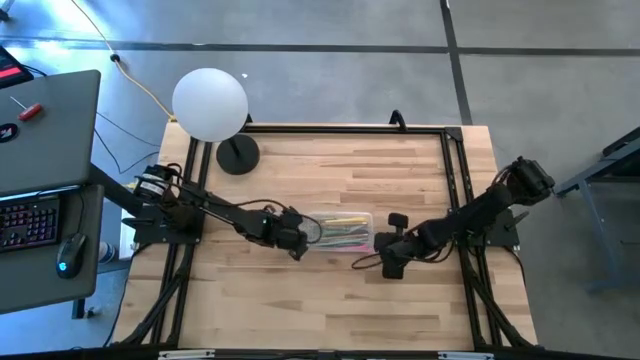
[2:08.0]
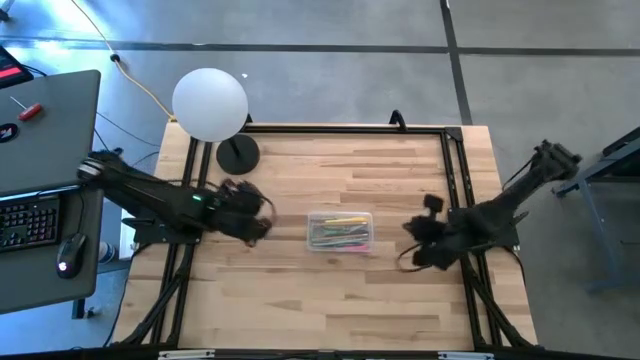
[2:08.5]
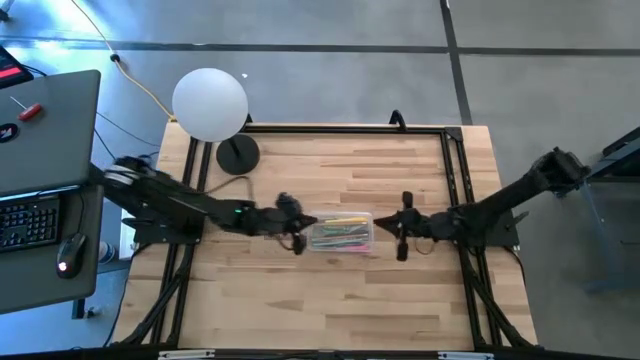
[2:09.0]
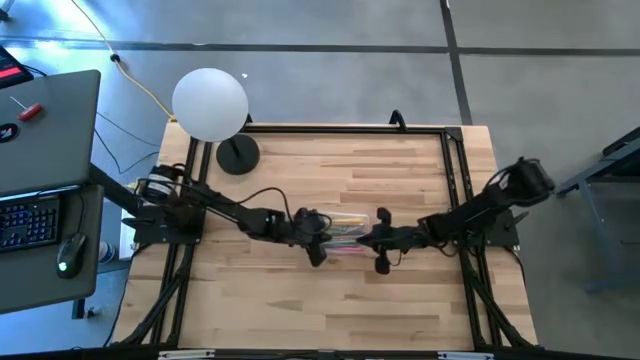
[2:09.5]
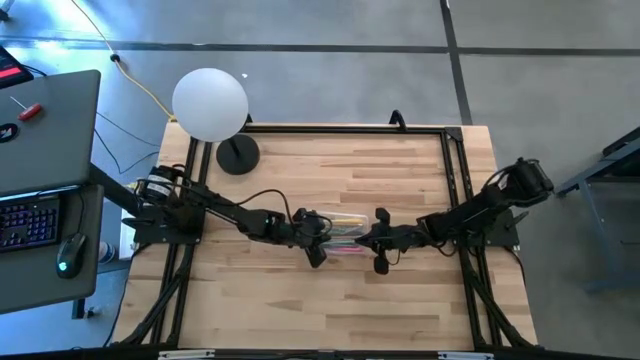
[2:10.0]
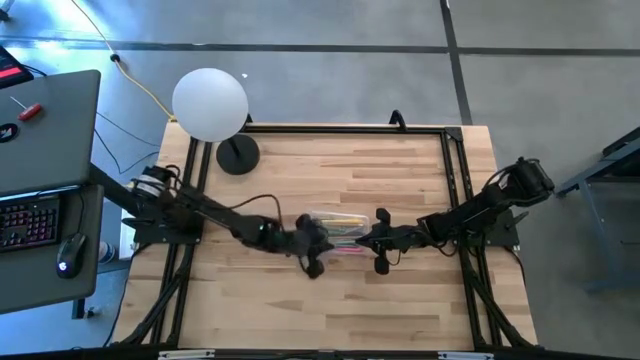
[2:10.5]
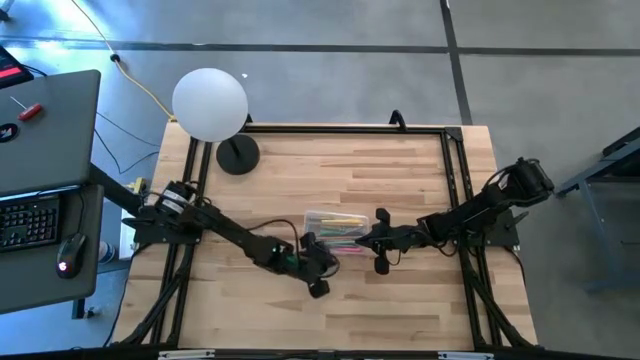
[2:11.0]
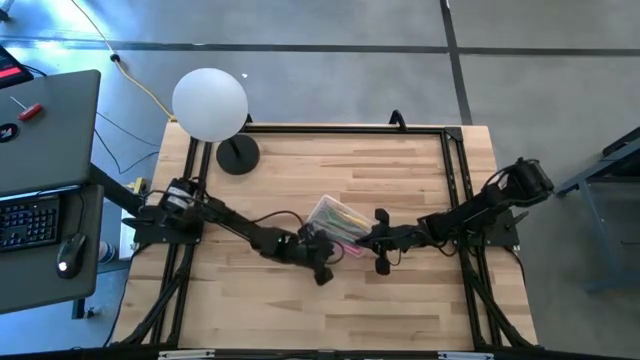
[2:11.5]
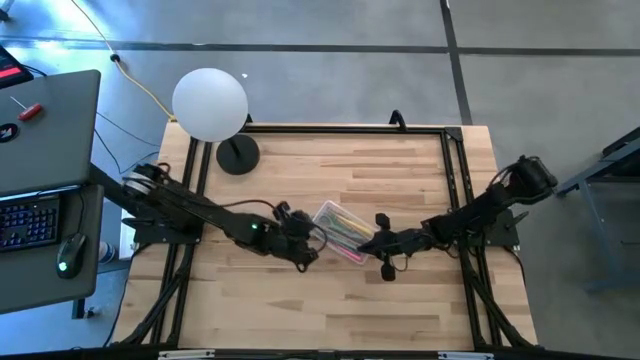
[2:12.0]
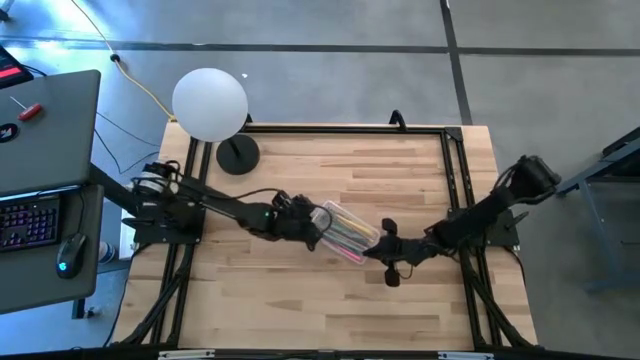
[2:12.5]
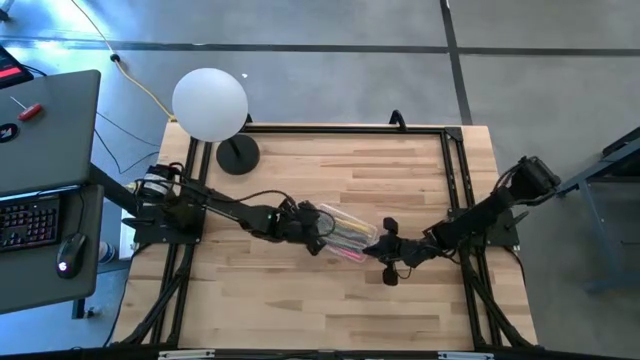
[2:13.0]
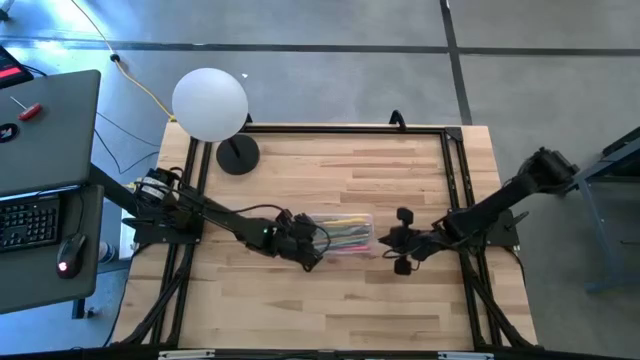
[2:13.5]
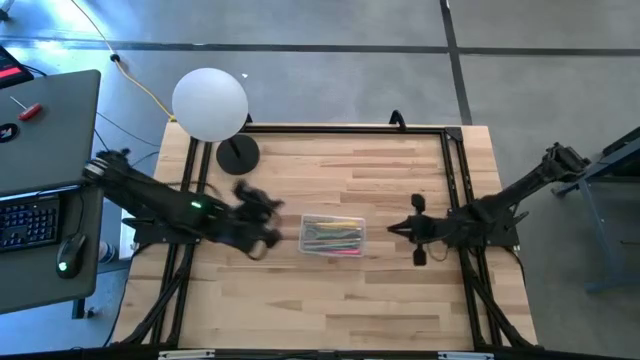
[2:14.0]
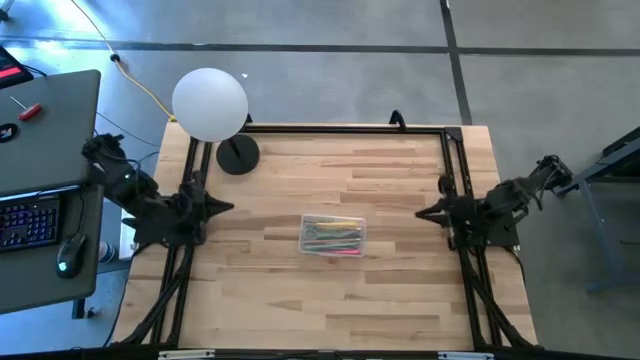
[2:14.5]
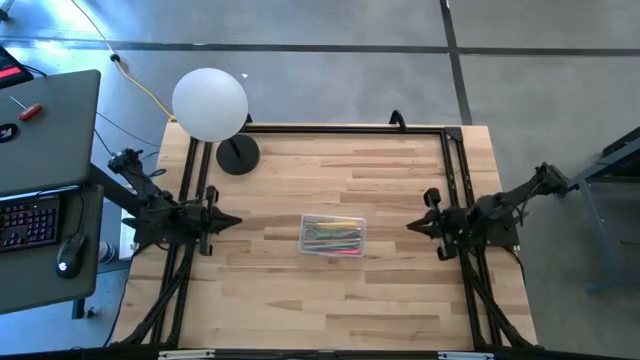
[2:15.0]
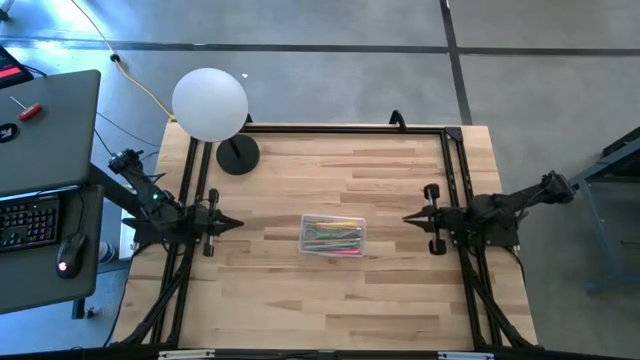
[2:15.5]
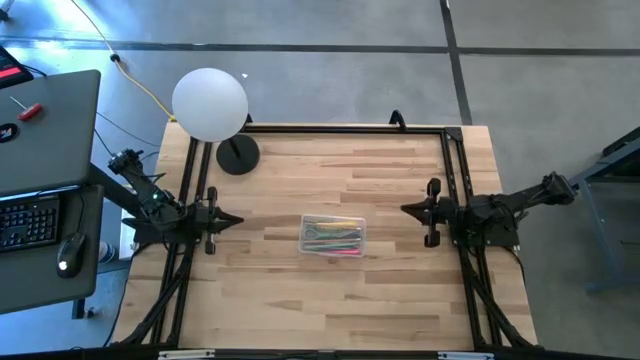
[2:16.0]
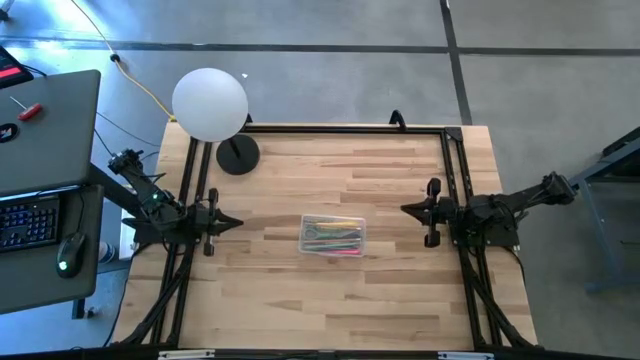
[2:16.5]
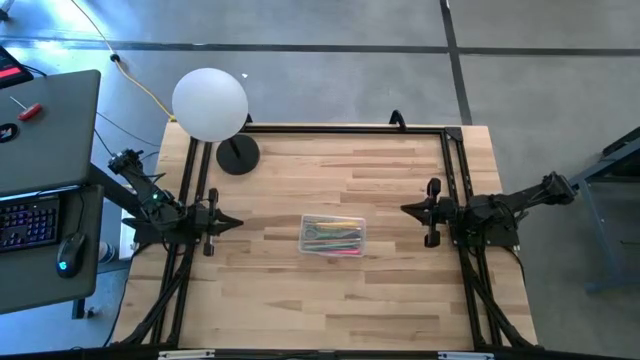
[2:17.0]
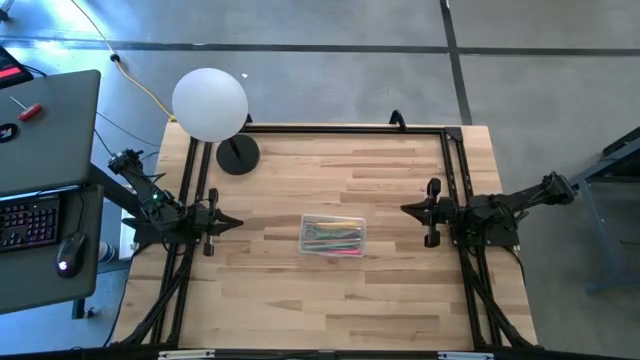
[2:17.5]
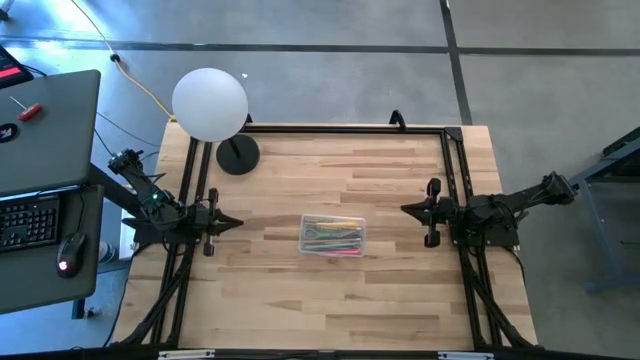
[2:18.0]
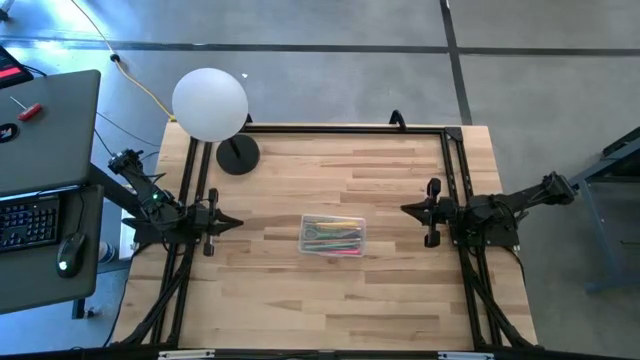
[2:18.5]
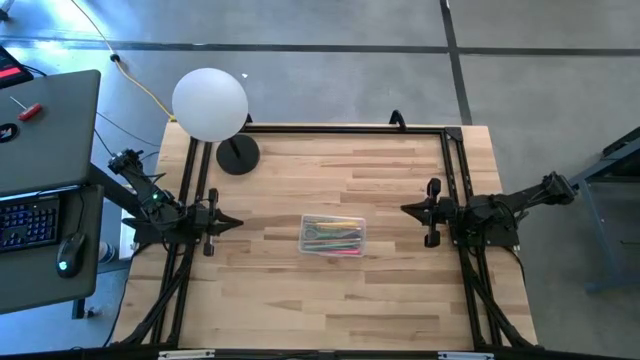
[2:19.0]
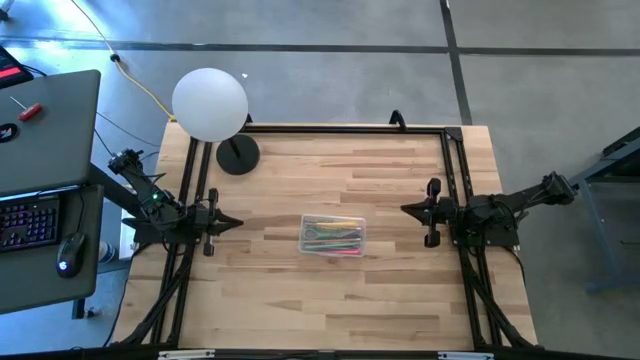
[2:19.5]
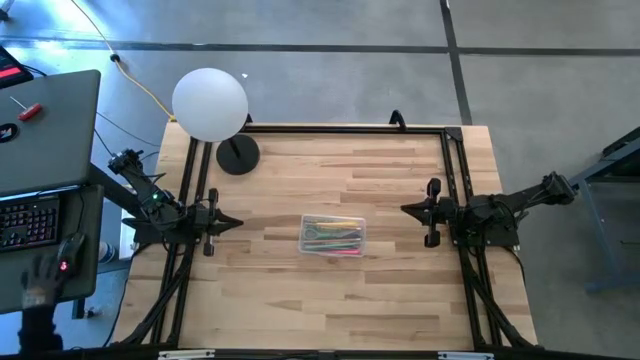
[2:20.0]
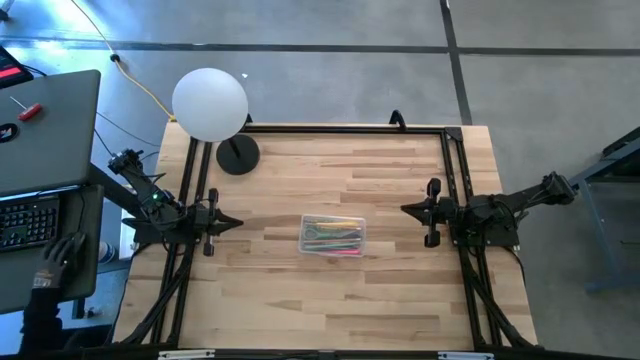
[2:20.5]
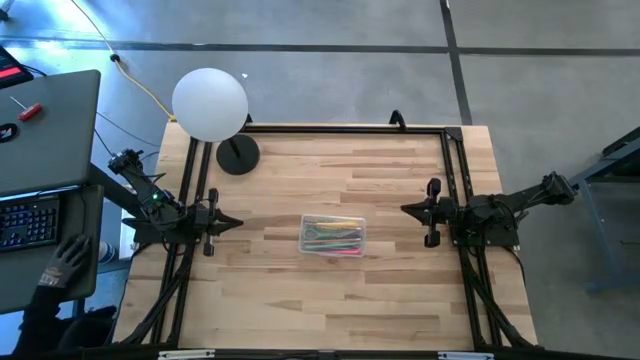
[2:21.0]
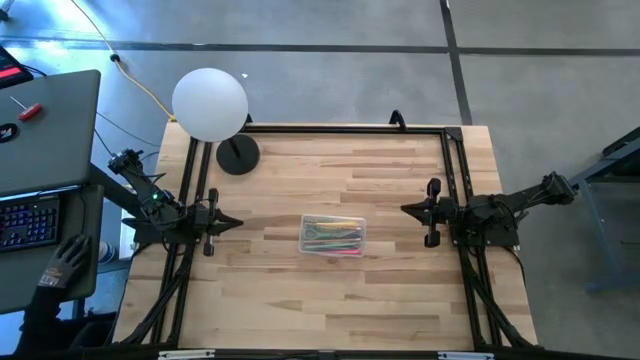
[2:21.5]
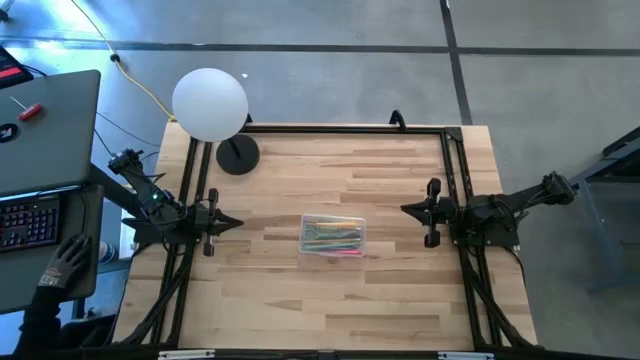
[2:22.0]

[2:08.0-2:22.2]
Task: Pick & place school supplies into a supply box
Return to Home Position

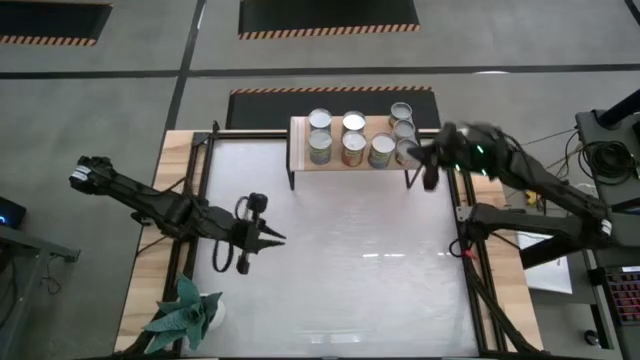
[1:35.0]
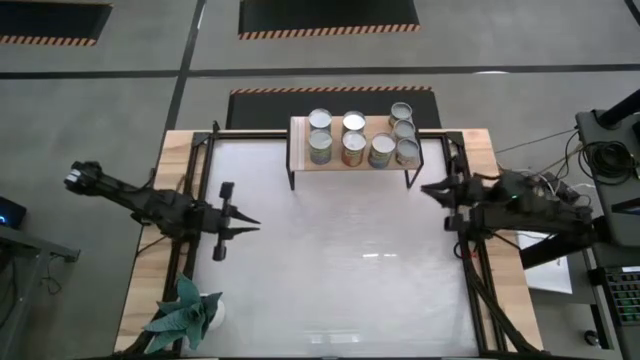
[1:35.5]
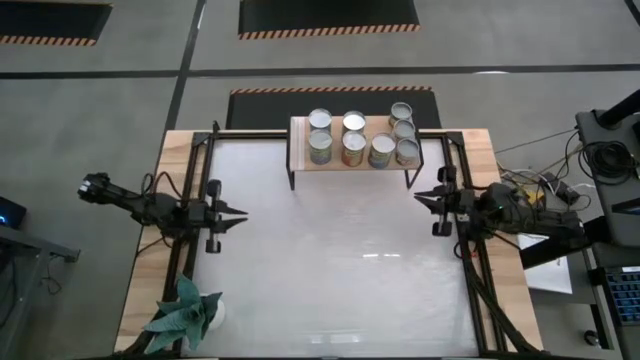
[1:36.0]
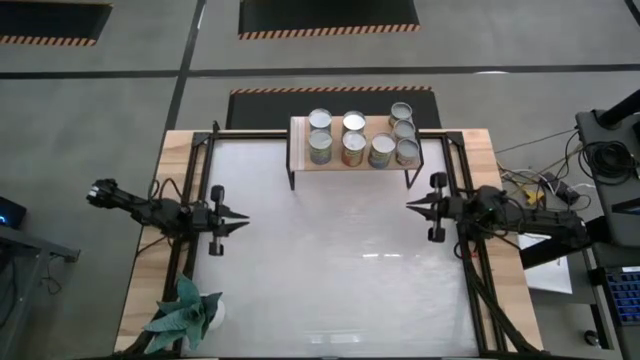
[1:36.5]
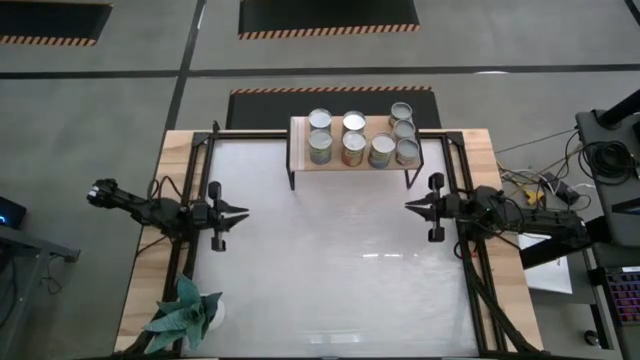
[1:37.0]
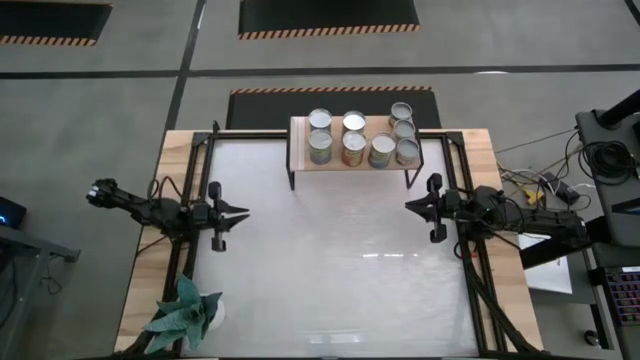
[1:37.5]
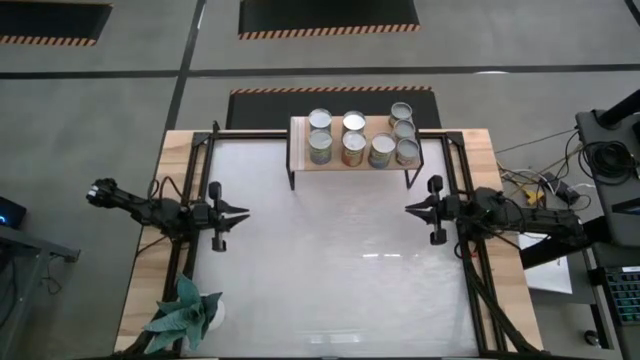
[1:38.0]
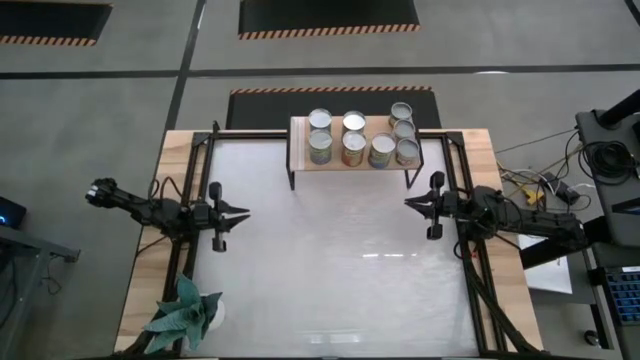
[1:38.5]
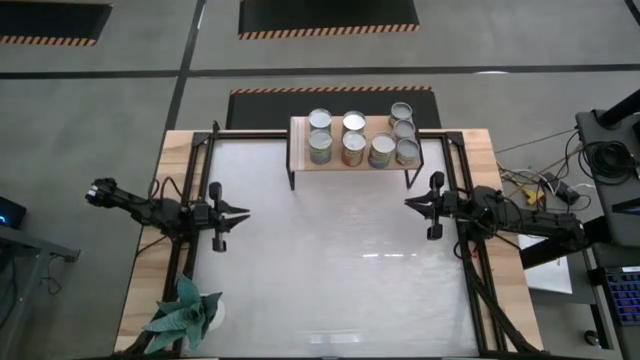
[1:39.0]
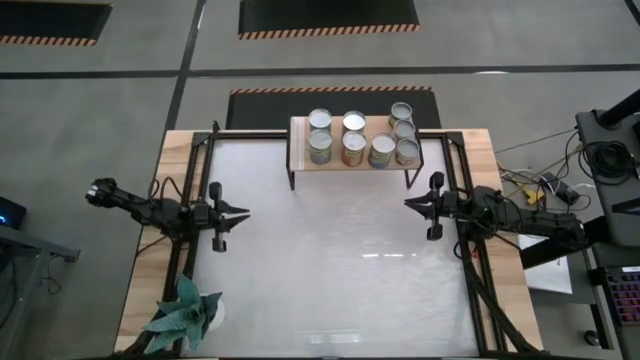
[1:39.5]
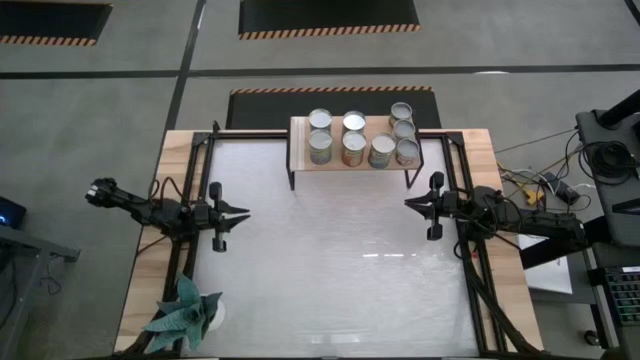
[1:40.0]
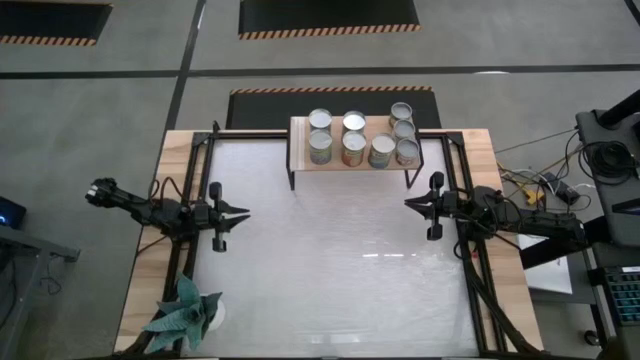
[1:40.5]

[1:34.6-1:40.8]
Task: Pick and place cans onto a shelf
Return To Home Position
